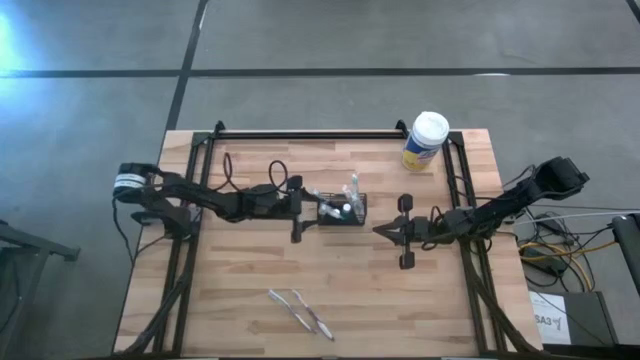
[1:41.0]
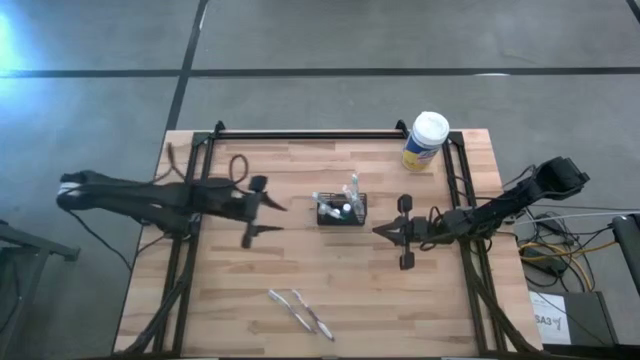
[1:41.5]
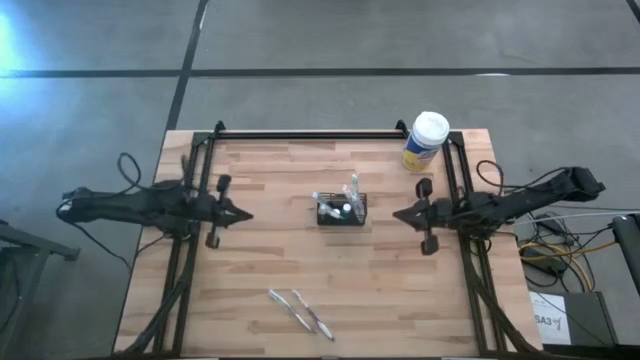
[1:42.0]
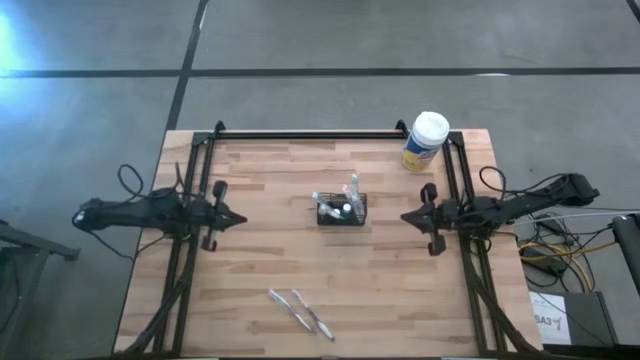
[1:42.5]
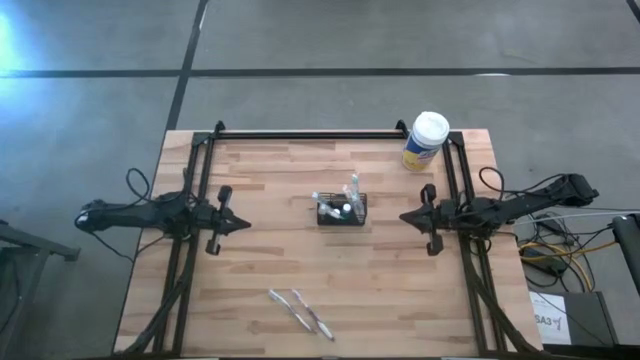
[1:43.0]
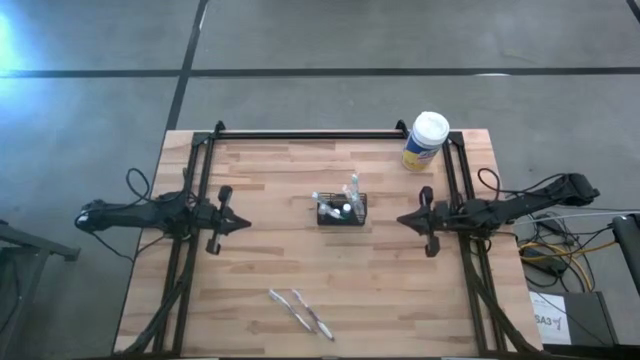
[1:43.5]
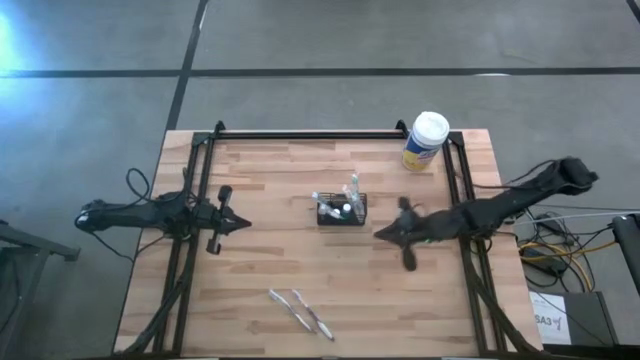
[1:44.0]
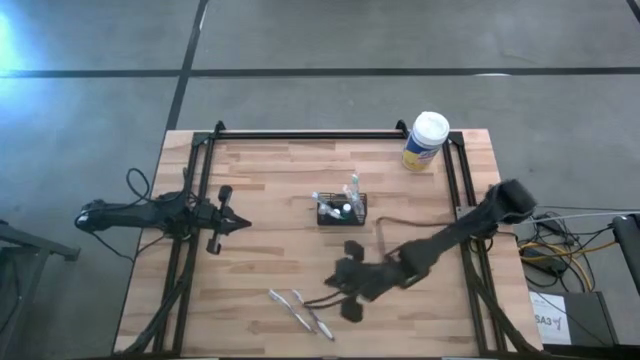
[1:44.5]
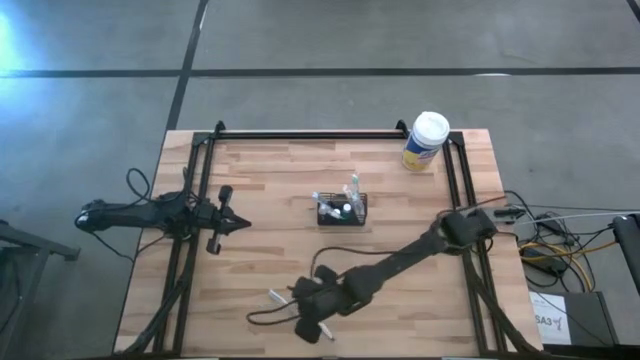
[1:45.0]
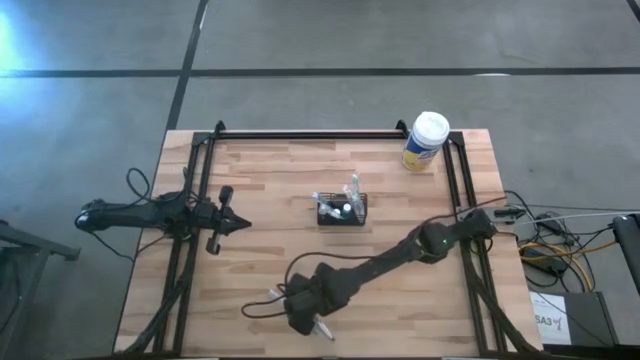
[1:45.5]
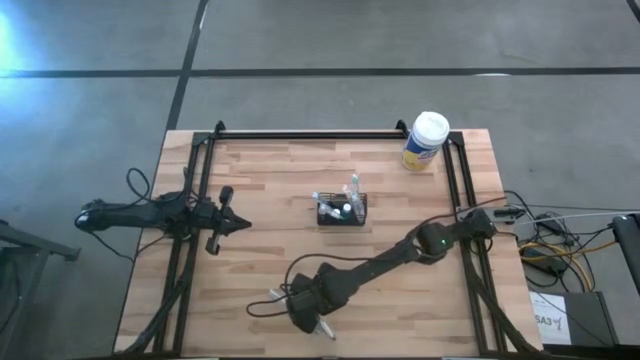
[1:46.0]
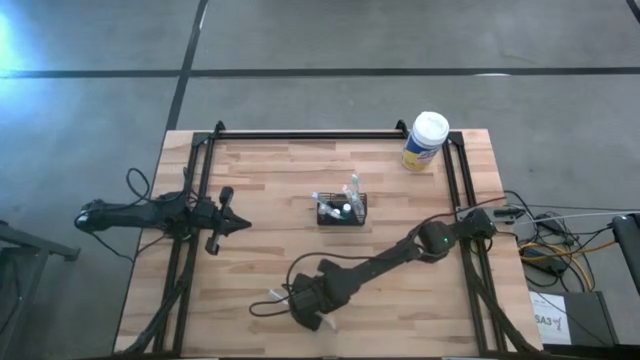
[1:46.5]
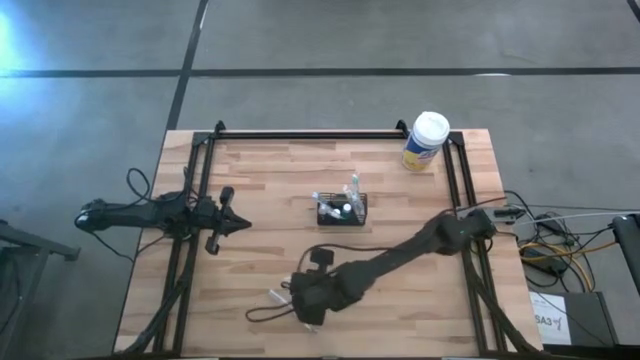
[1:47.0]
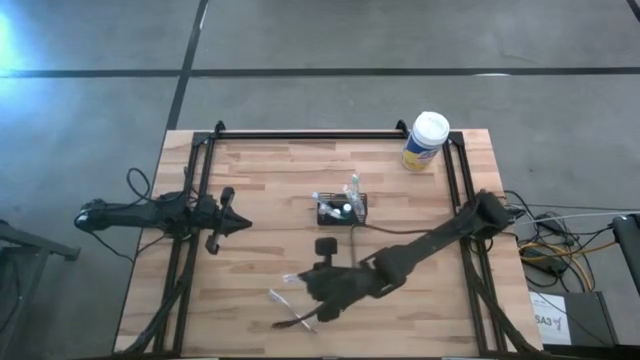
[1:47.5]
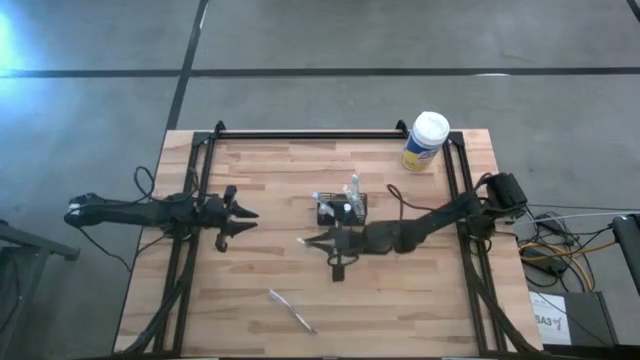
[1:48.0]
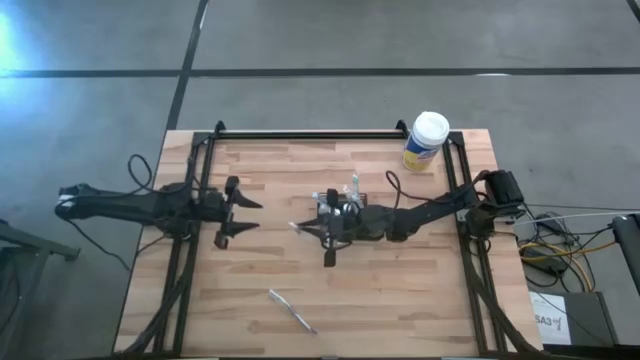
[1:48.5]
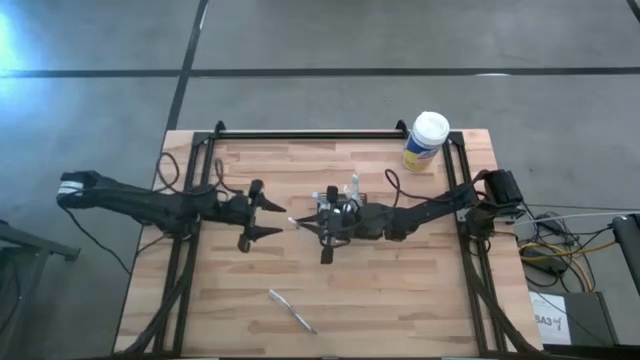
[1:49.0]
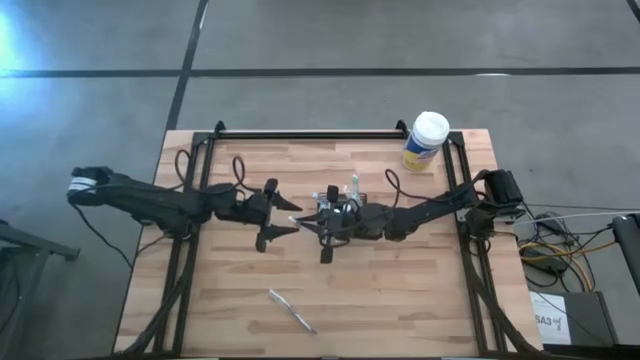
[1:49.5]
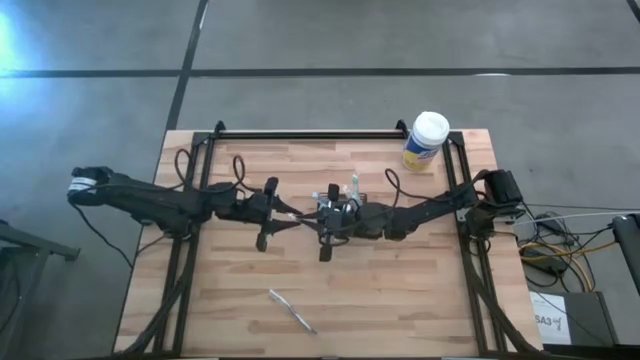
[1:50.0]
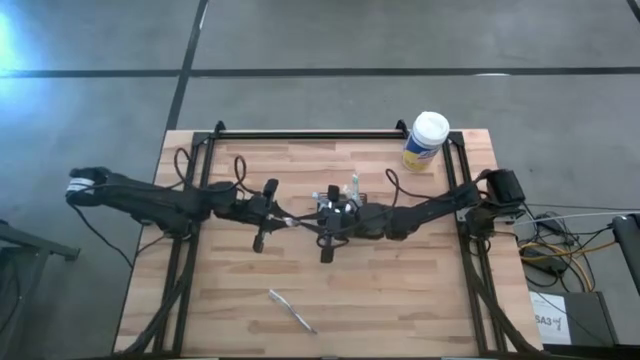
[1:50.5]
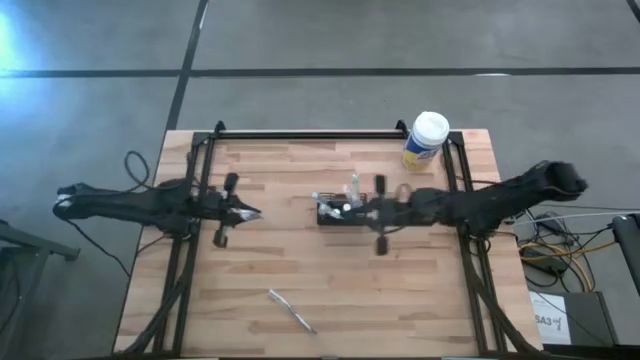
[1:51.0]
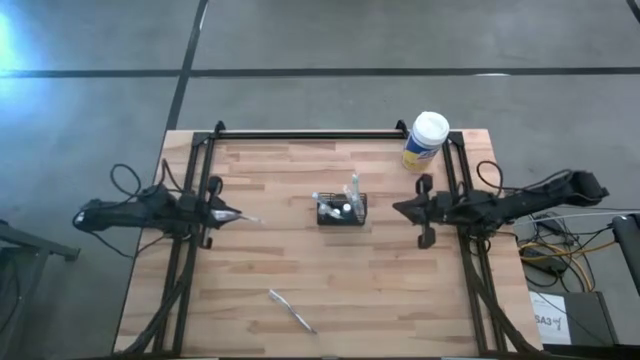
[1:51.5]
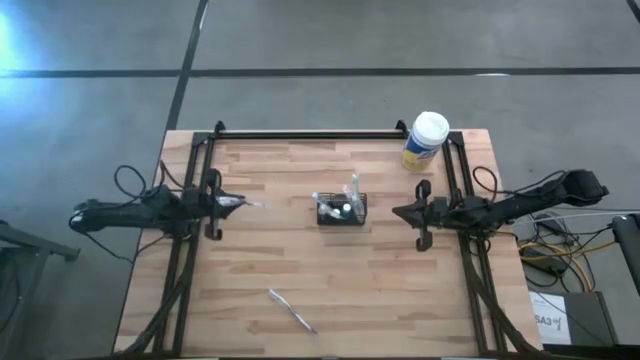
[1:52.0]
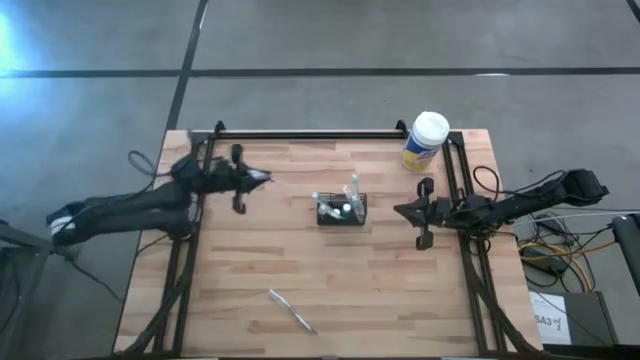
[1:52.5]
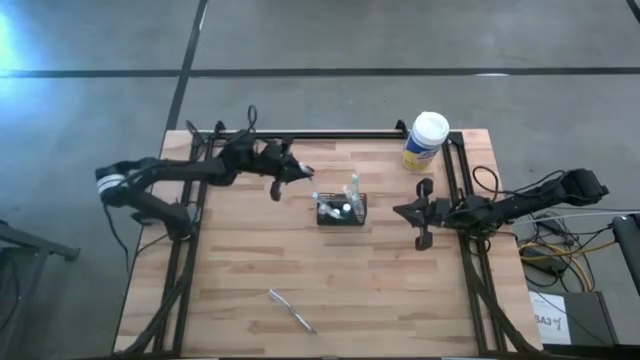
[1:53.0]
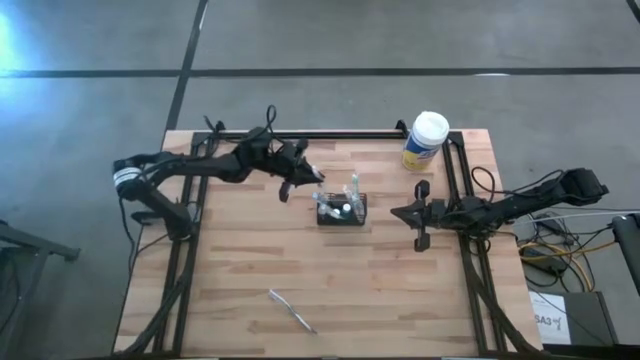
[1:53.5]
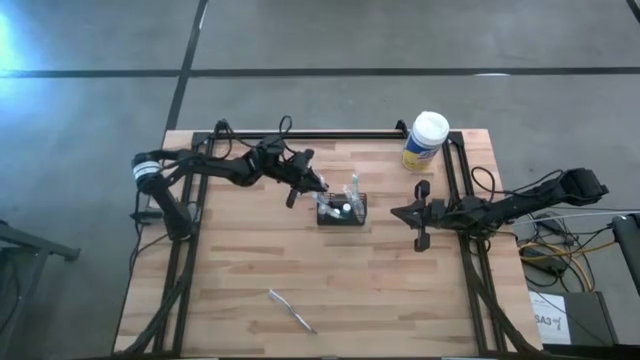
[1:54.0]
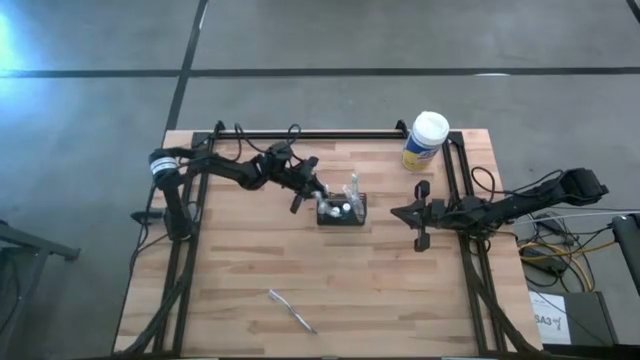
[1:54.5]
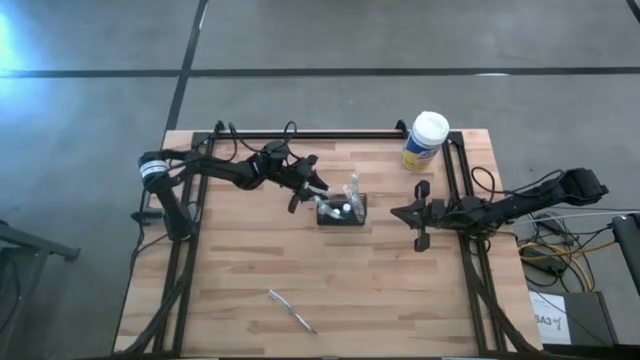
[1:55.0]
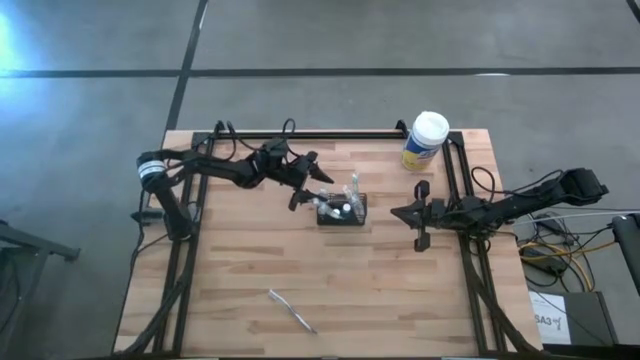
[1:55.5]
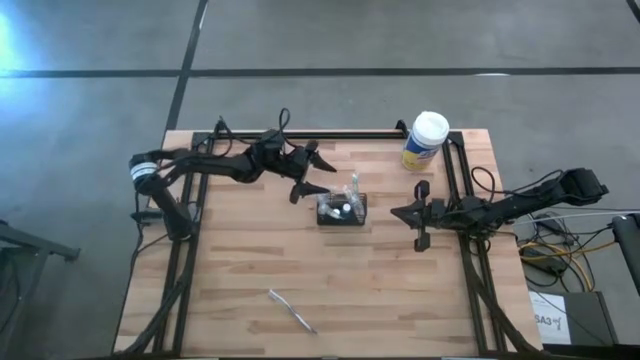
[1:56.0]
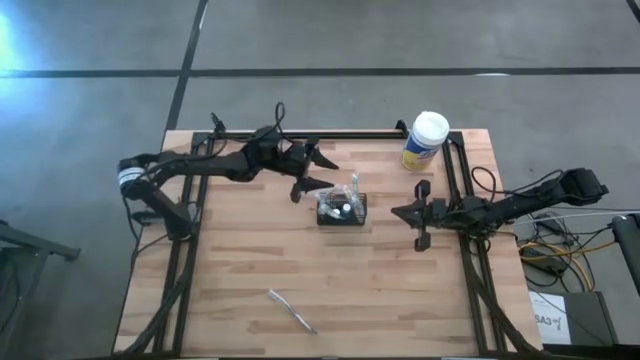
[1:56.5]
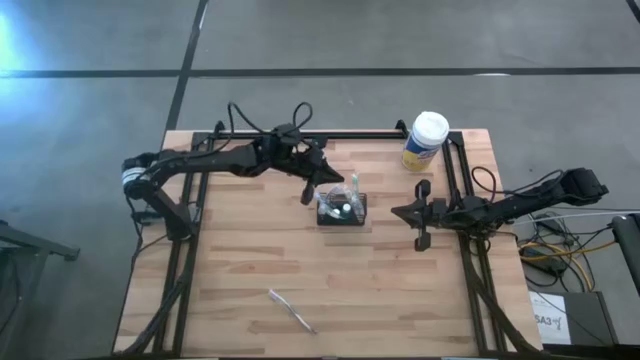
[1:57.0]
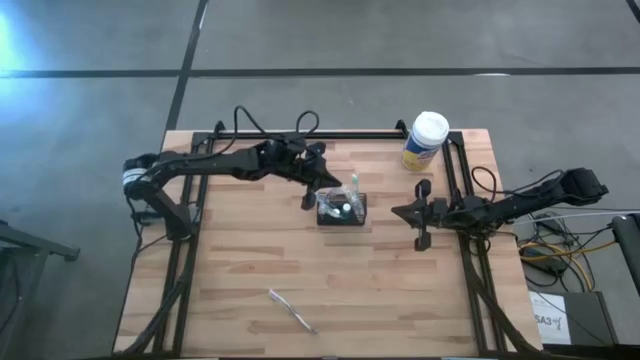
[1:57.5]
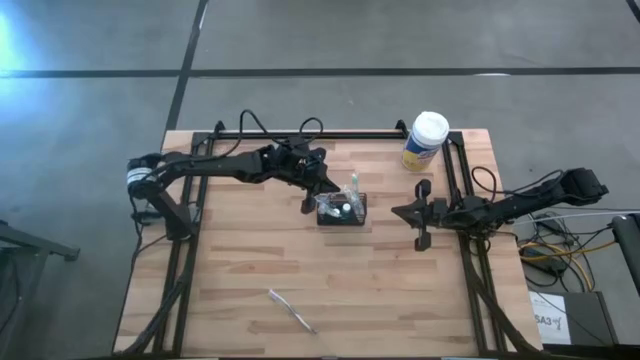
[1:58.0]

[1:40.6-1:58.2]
Task: Pick & Place toothbrushing station
Put the right purple toothbrush into the wire organizer

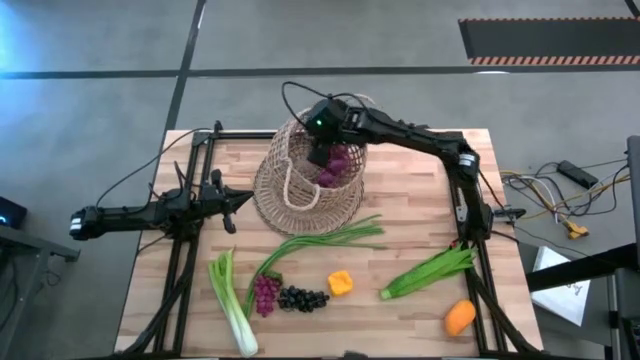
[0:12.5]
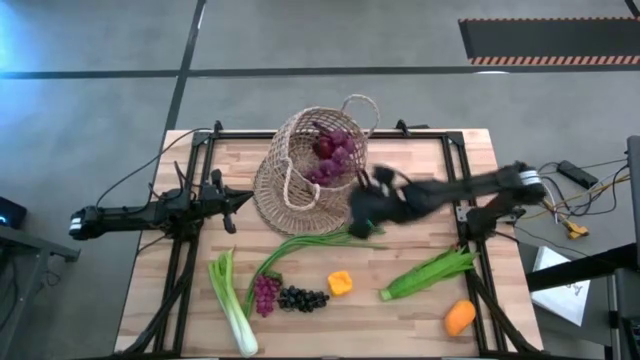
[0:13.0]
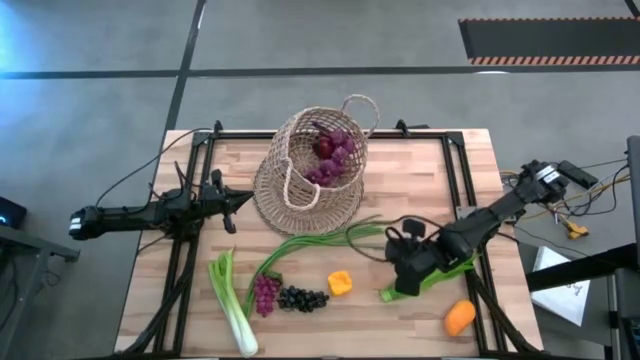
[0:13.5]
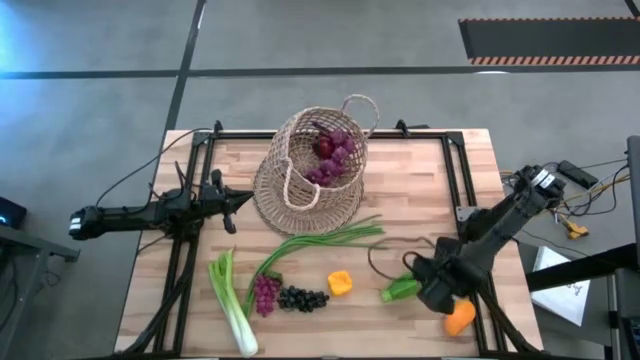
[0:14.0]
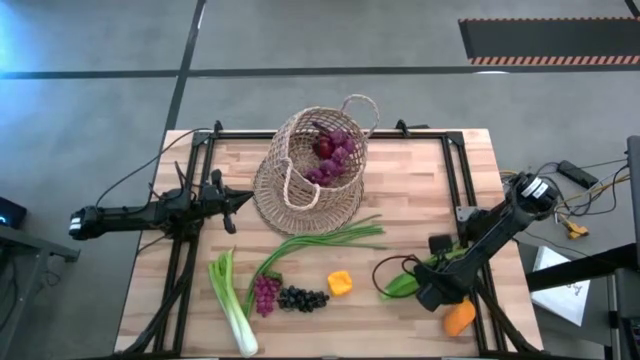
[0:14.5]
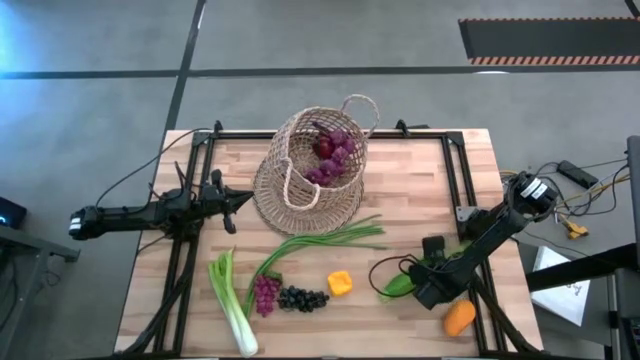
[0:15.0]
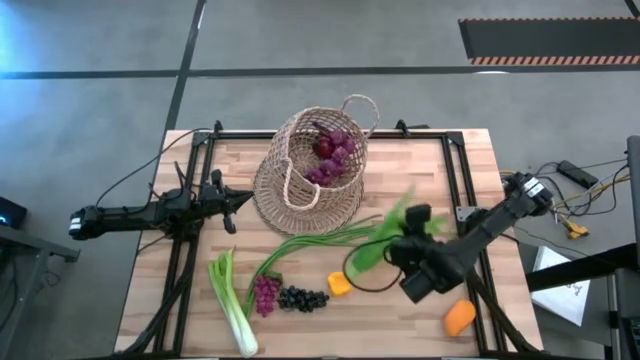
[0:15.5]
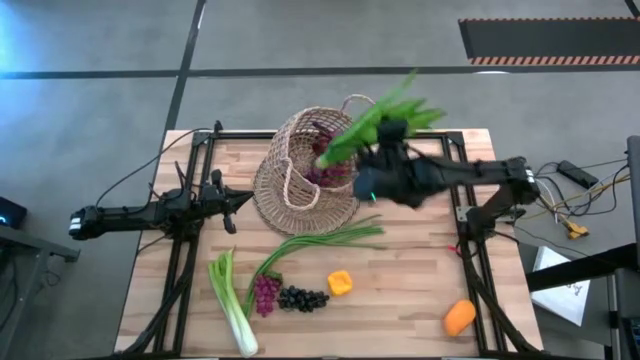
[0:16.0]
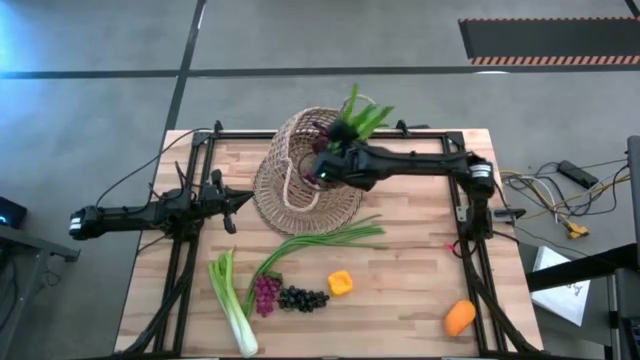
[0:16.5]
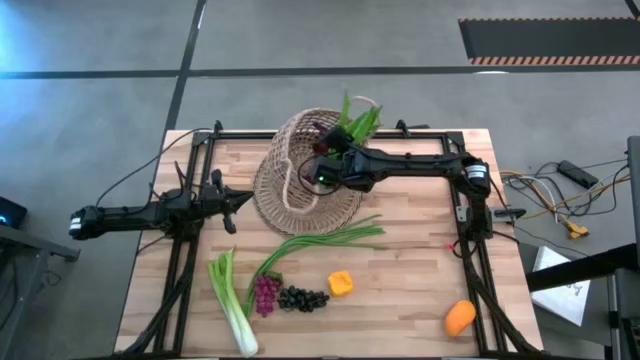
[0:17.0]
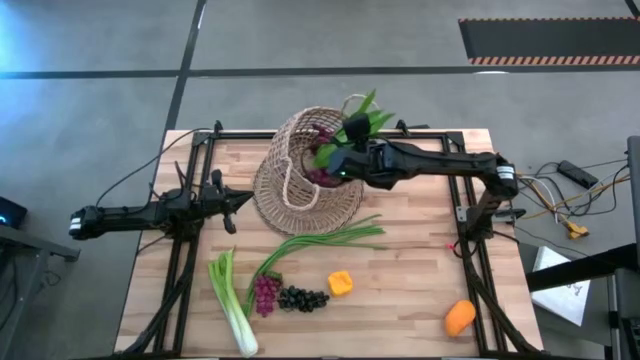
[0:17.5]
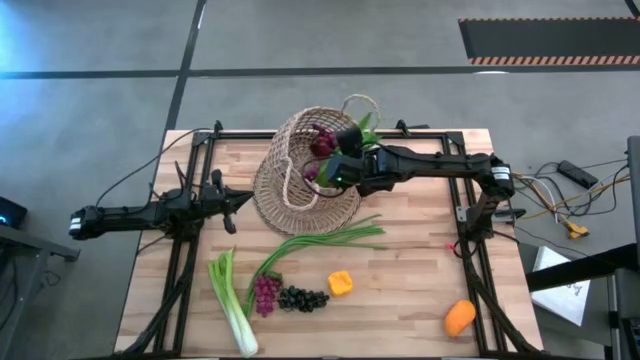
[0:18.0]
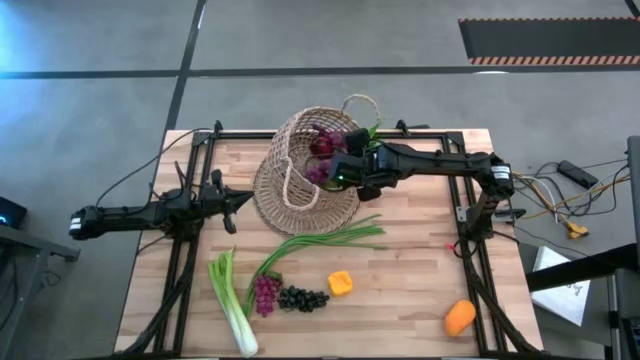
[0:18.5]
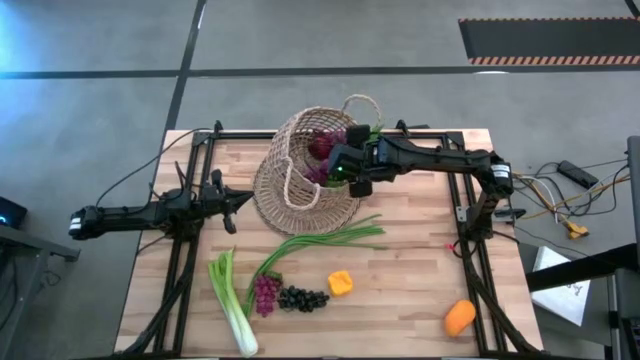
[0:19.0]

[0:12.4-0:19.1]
Task: Build produce basket
Put the green leaf lettuce into the brown basket
